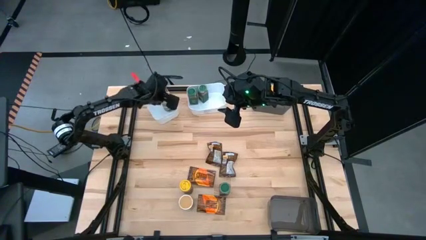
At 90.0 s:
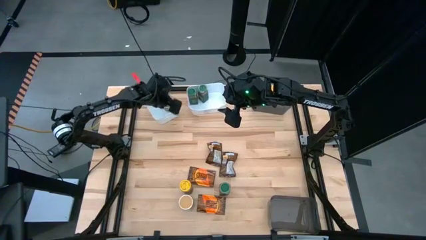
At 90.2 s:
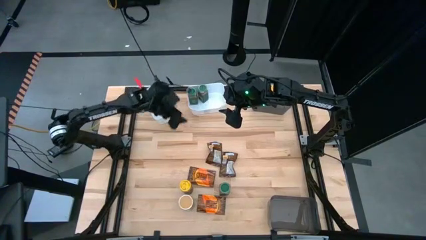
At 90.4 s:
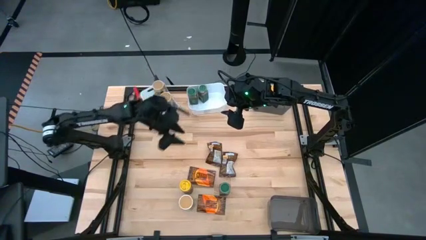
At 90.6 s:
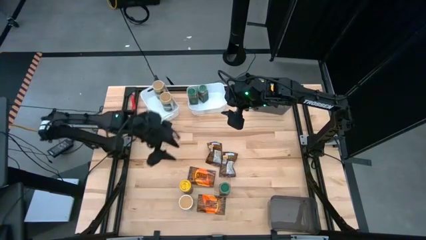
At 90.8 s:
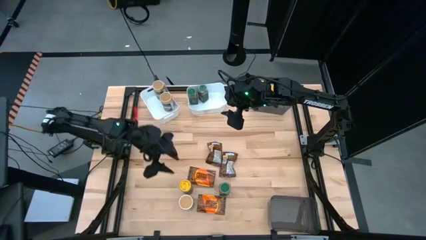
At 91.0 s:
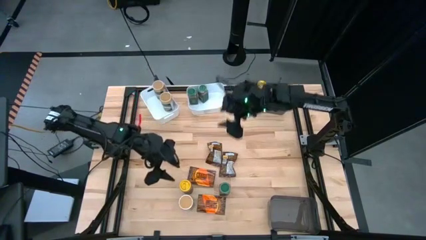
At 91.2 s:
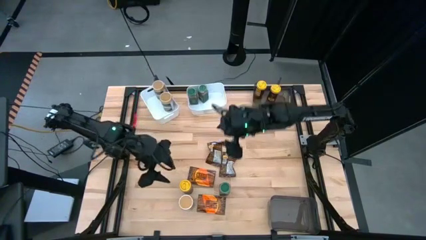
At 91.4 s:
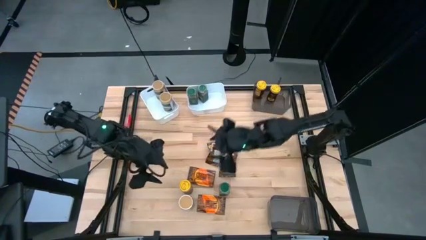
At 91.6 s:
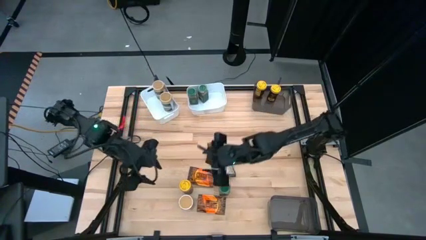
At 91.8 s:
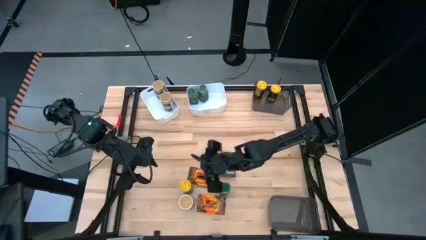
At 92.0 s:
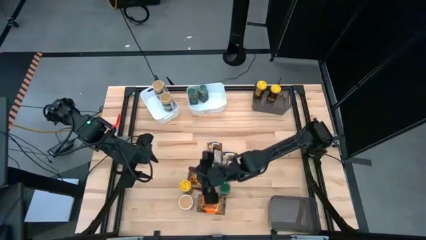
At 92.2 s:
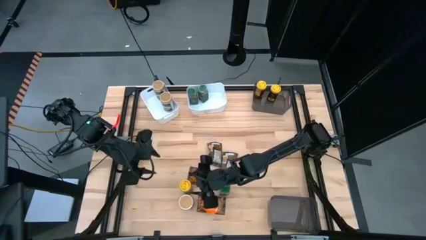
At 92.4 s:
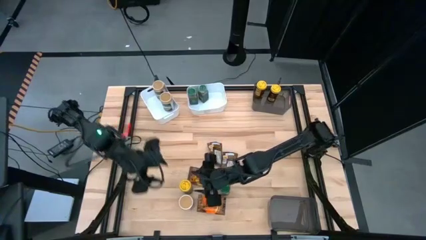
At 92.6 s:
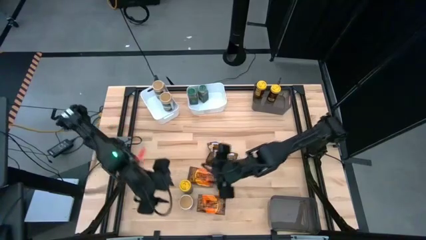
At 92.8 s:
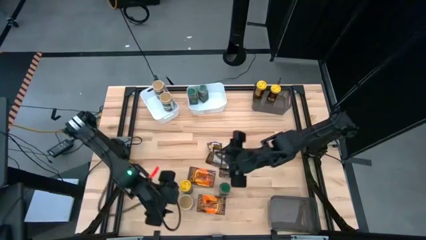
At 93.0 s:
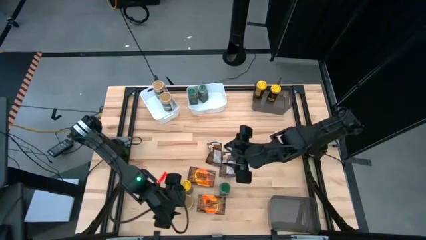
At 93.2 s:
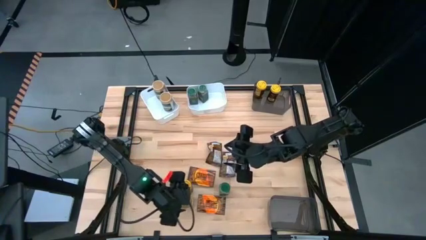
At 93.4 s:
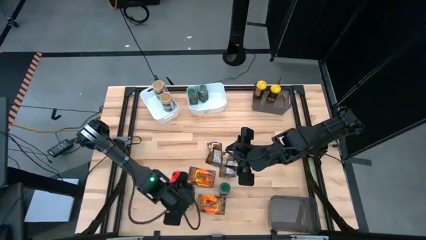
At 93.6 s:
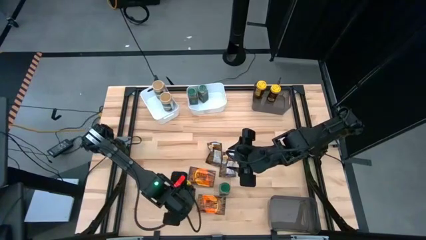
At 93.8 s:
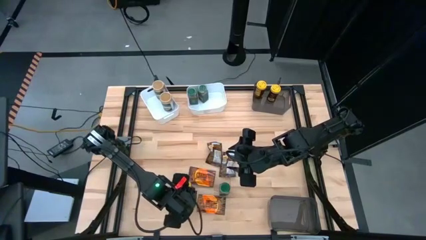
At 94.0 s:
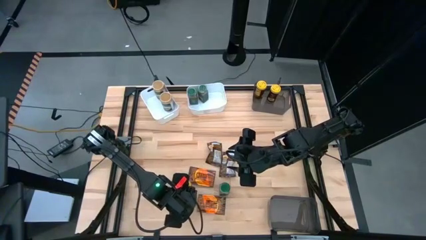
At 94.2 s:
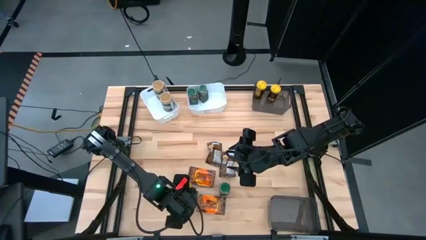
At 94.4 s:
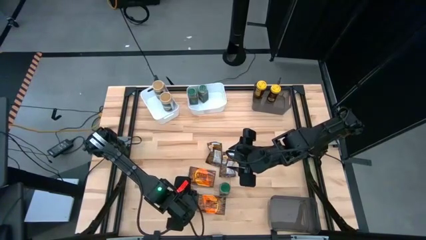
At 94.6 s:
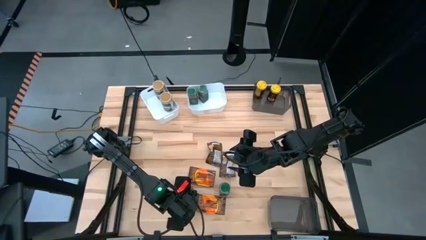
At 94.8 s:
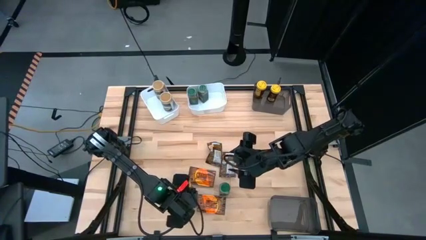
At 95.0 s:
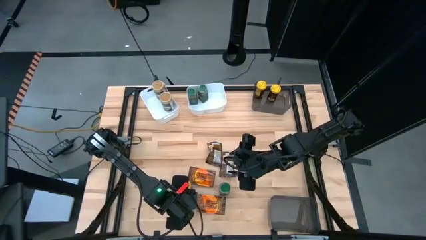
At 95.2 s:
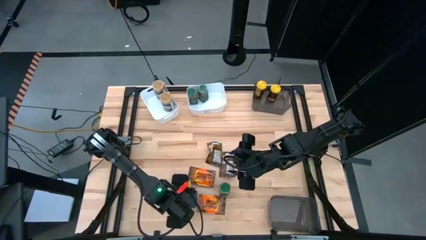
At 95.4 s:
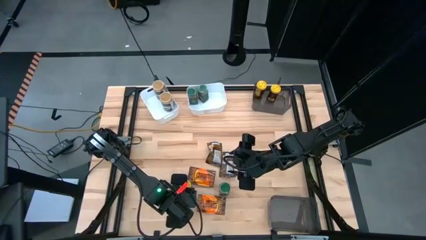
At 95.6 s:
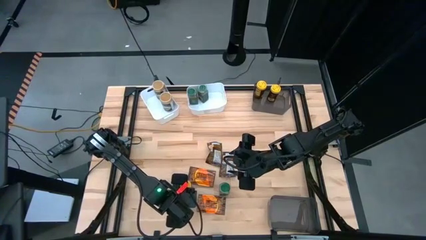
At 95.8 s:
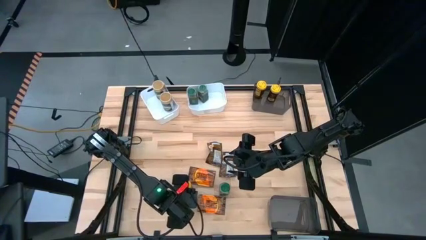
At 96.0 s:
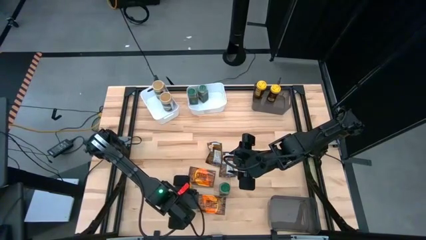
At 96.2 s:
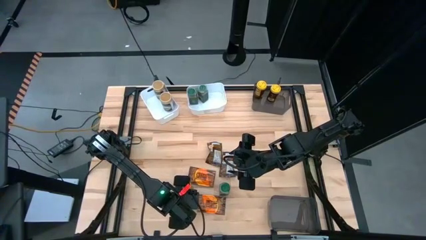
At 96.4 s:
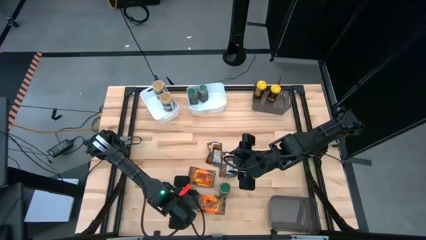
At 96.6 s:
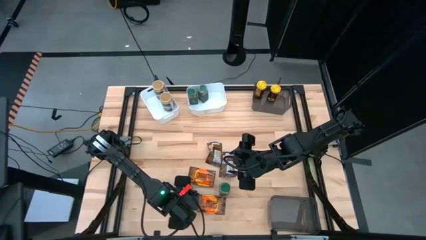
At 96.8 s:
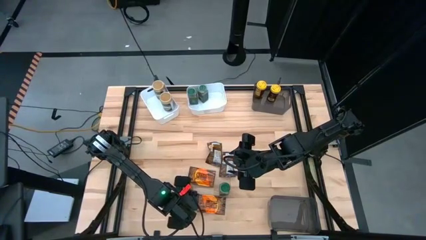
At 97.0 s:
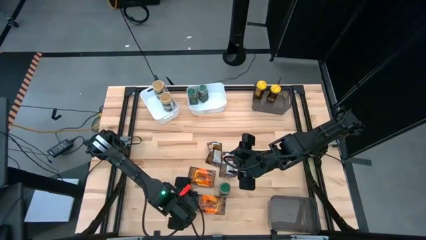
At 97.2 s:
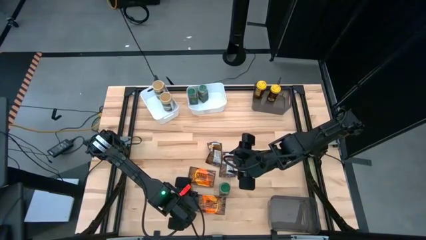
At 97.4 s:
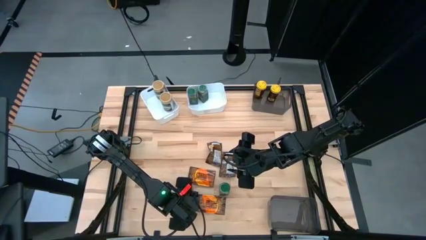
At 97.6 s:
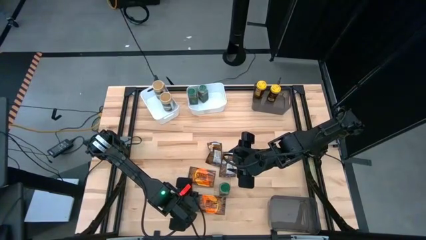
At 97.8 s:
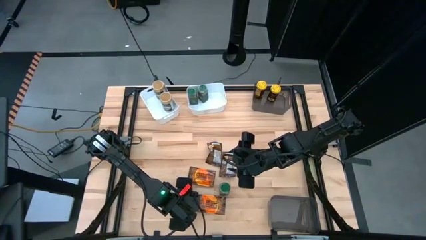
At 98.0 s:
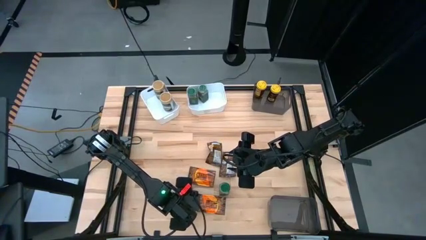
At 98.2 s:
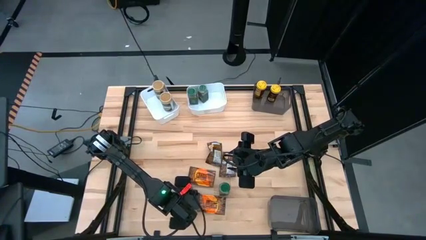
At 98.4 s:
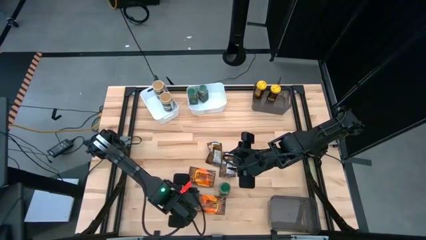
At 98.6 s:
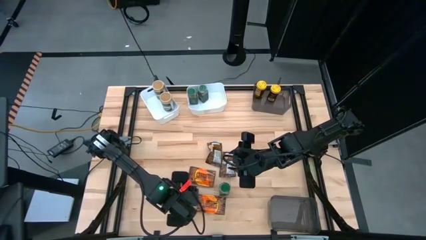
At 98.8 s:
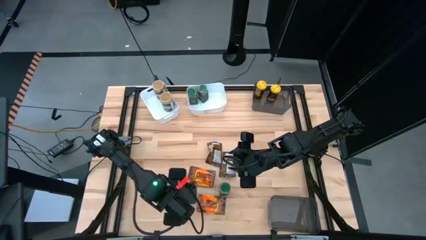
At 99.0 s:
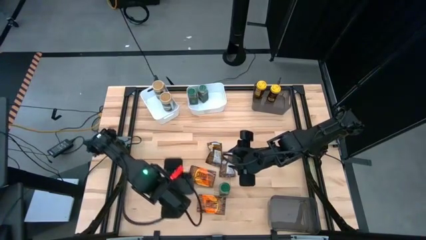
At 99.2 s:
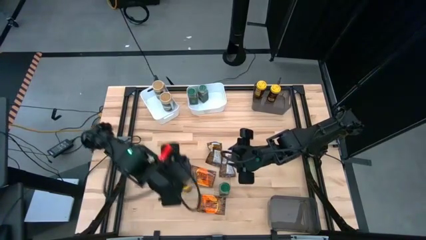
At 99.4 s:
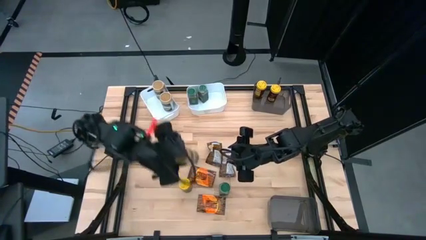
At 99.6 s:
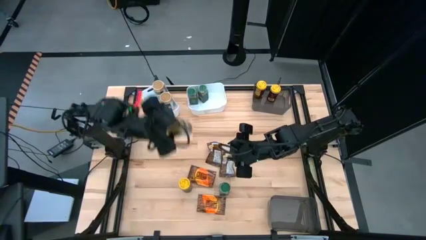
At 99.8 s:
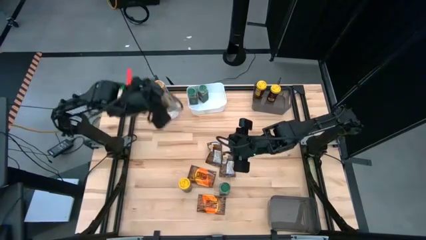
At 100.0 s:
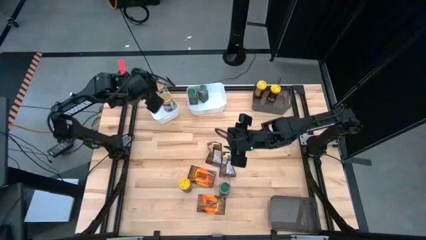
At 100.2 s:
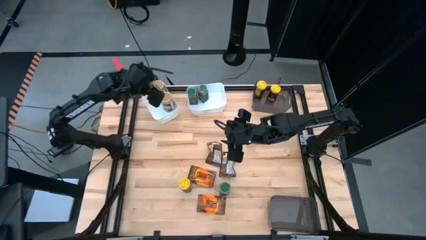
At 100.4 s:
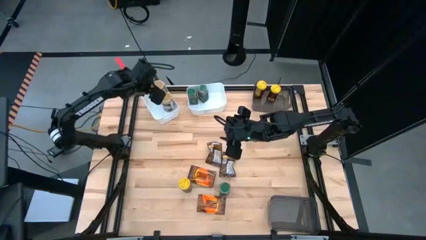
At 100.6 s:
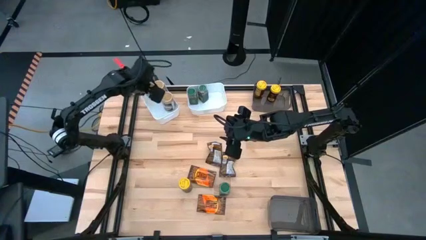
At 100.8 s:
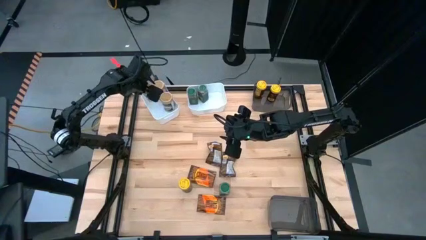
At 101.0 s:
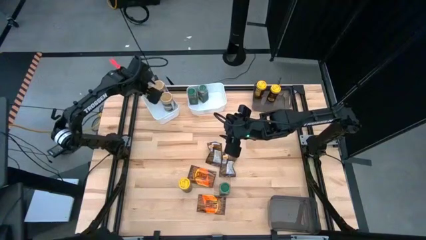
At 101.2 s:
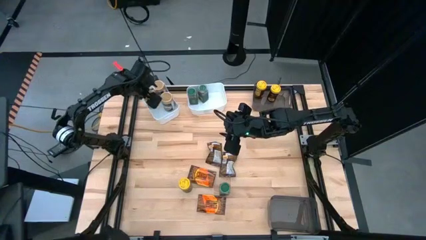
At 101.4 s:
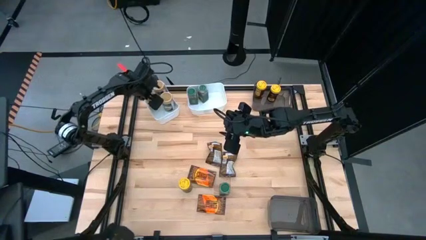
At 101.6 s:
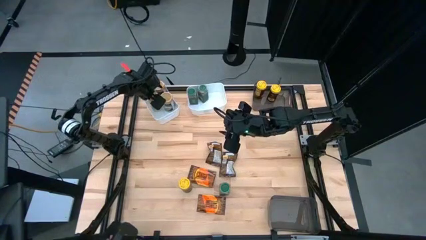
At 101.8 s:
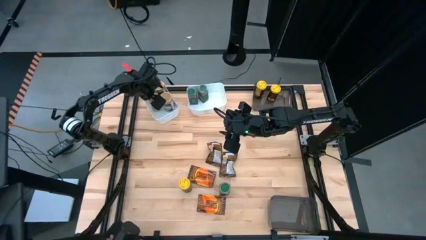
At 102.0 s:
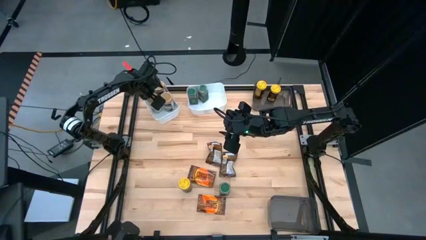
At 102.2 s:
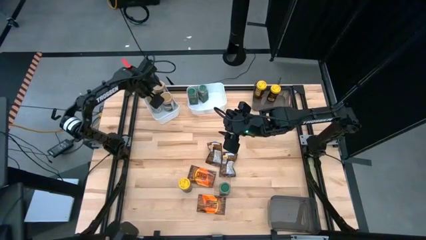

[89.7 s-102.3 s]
Task: Sort spices by type
Put the gold seasoning bottle into the left white bin

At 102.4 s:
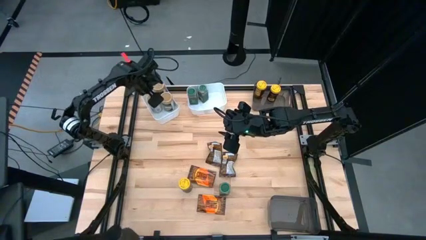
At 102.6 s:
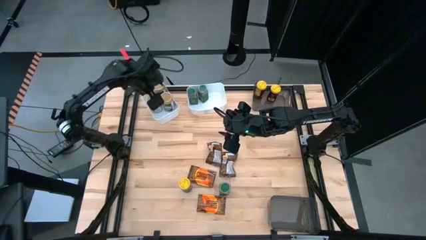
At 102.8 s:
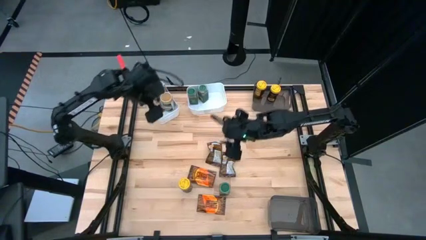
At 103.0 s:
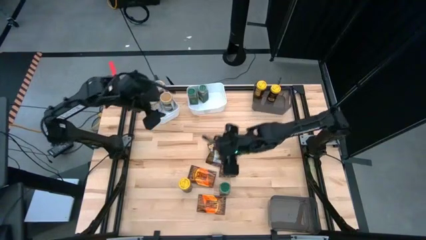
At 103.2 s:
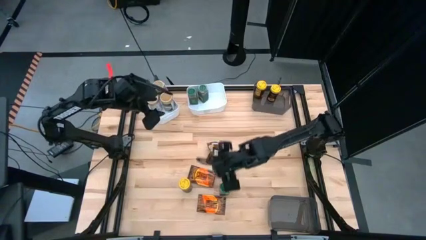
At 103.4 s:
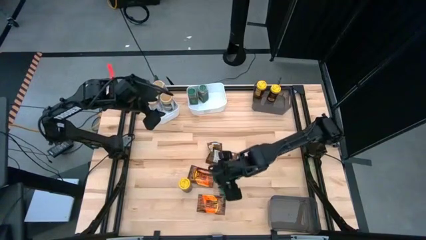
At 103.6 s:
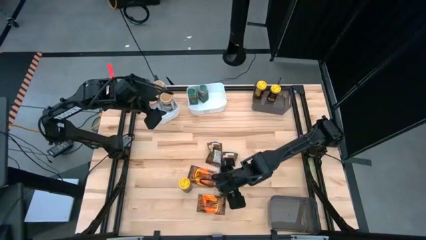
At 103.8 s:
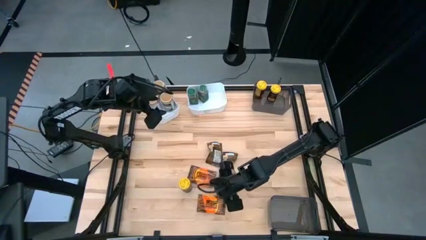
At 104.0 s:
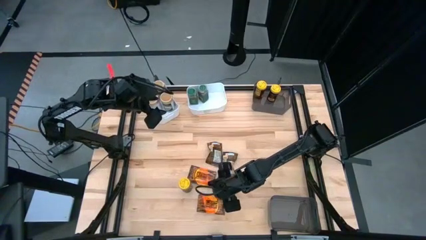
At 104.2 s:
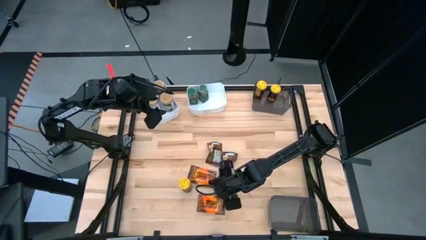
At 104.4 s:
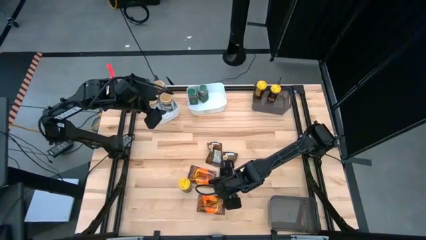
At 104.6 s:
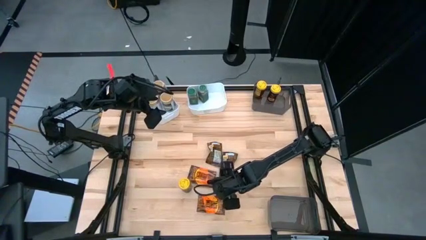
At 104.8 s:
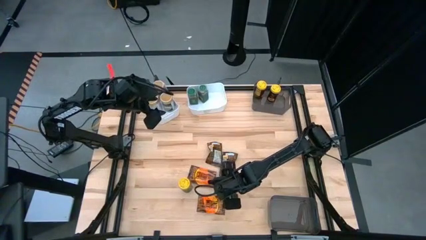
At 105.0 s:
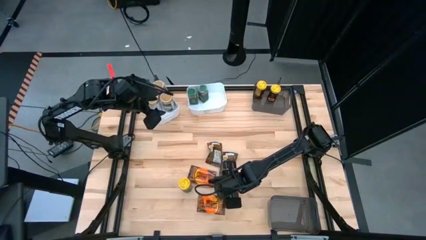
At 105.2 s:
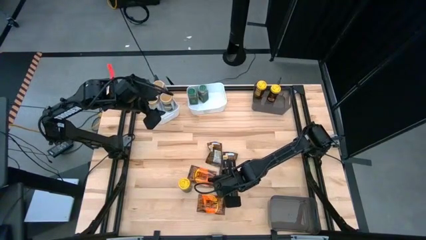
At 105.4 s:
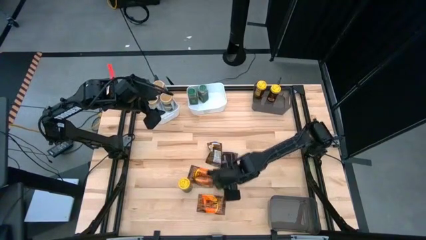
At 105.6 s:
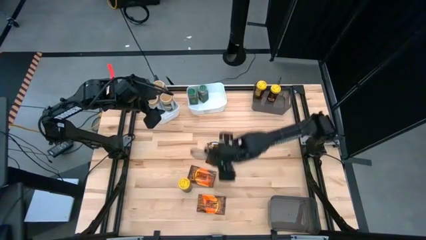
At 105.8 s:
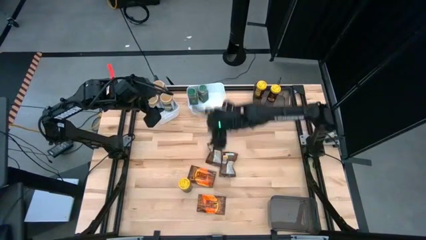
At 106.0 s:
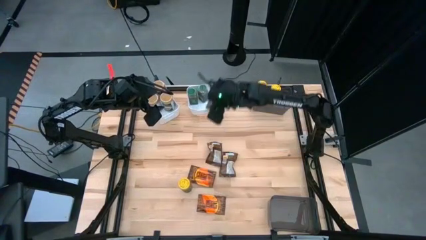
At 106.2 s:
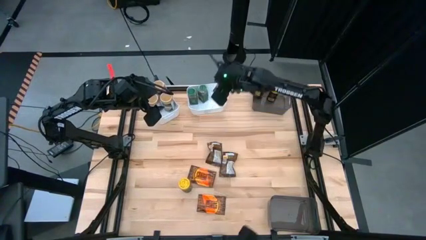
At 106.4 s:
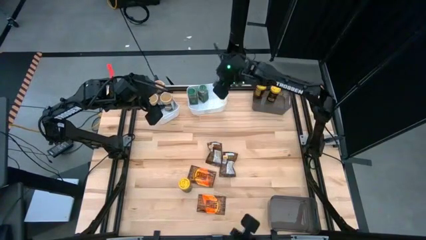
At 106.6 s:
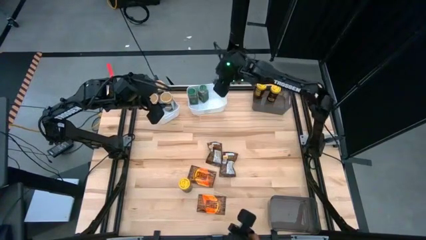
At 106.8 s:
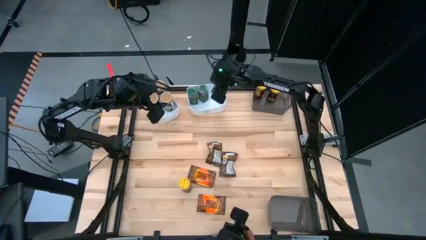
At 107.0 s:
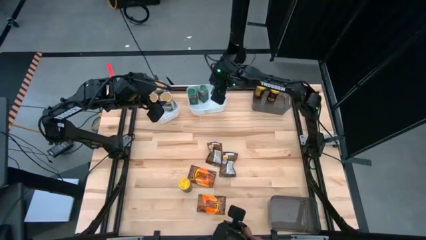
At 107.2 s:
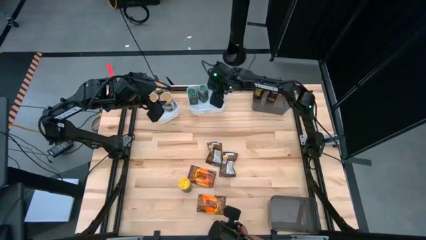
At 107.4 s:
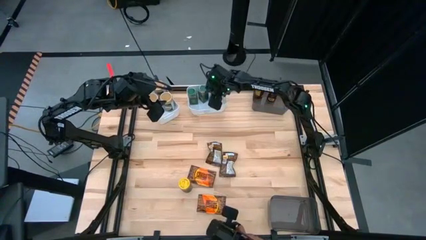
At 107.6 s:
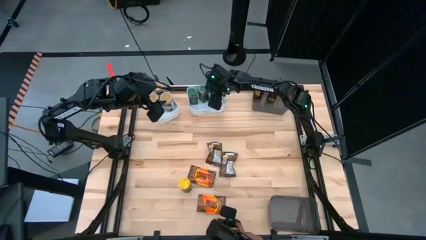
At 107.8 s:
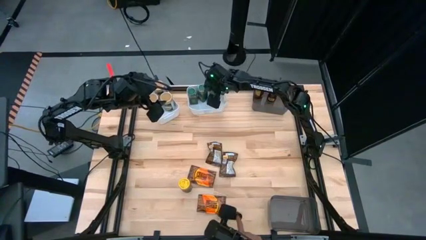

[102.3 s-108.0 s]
Put the green seasoning bottle into the right white bin
